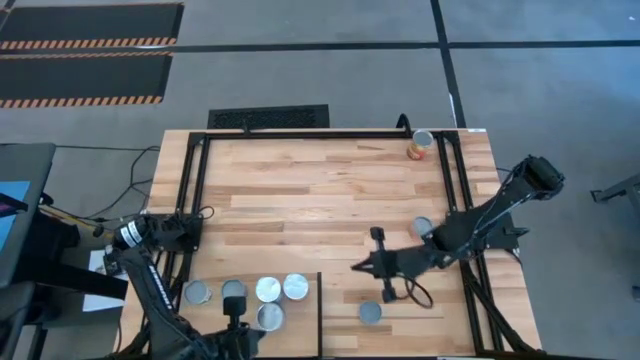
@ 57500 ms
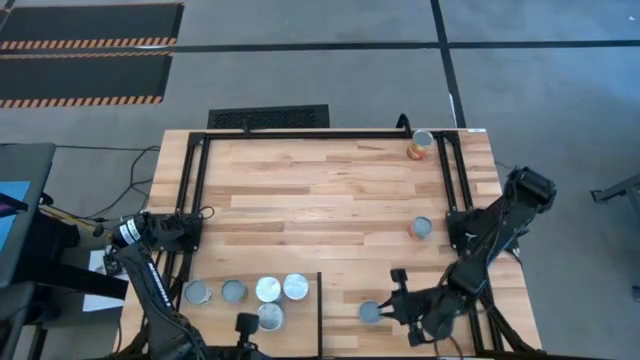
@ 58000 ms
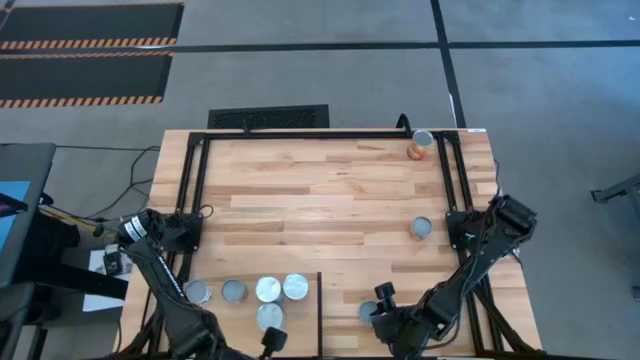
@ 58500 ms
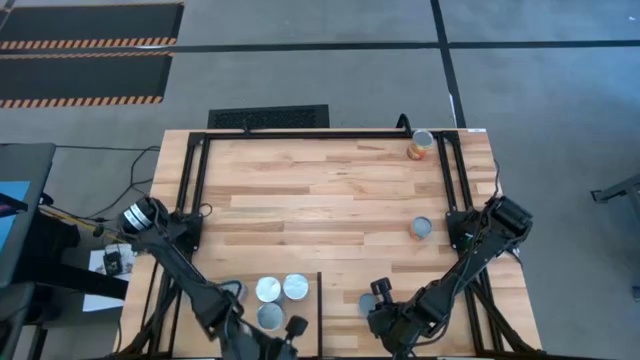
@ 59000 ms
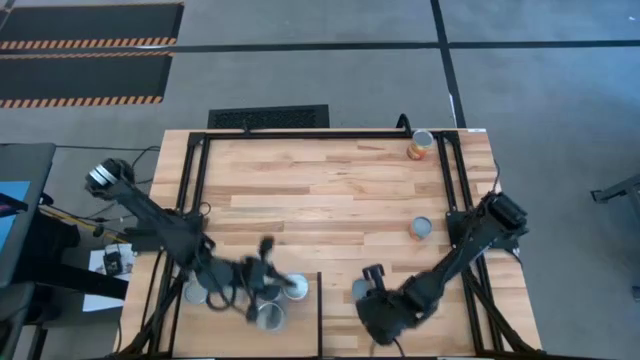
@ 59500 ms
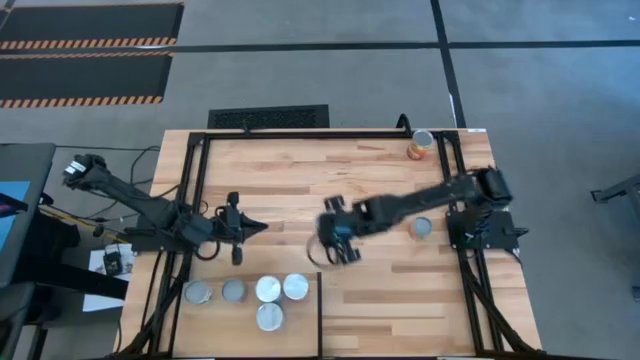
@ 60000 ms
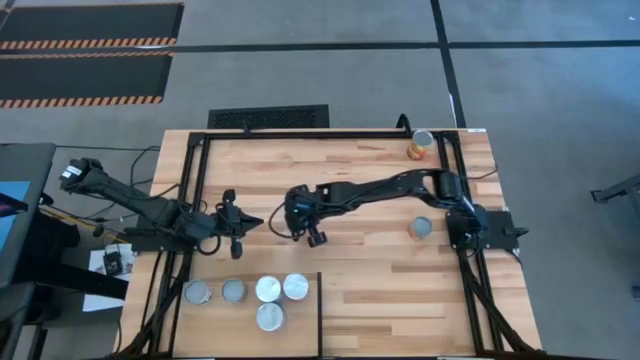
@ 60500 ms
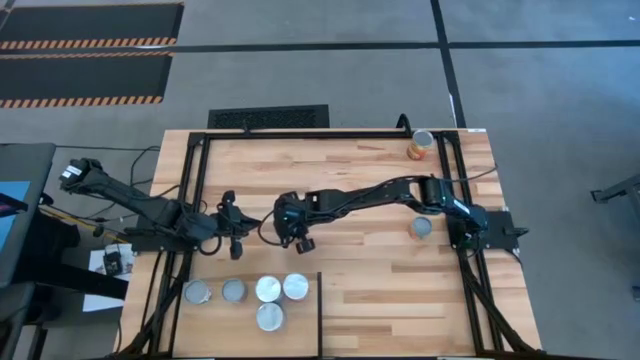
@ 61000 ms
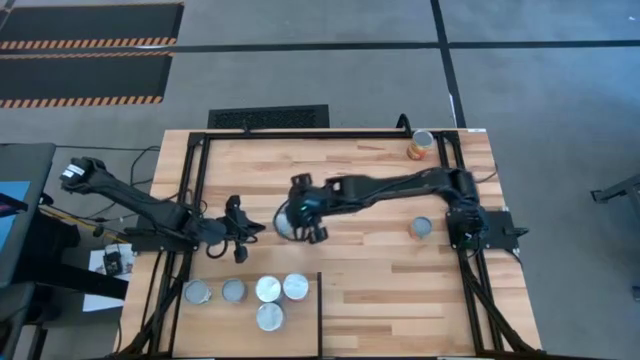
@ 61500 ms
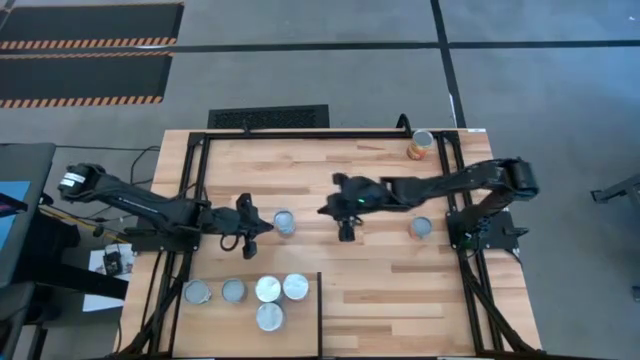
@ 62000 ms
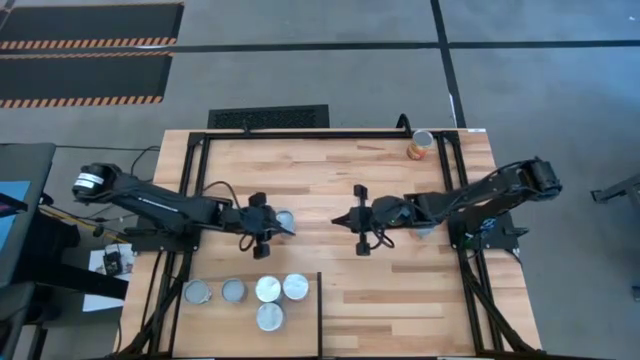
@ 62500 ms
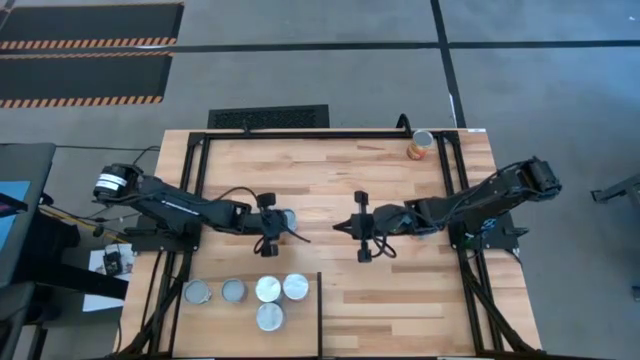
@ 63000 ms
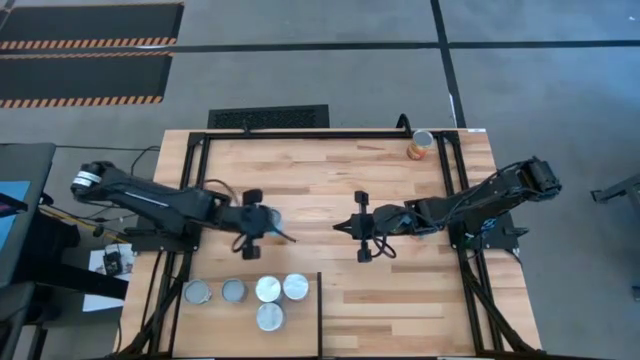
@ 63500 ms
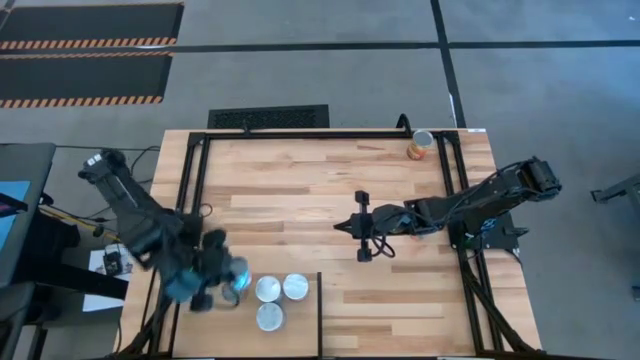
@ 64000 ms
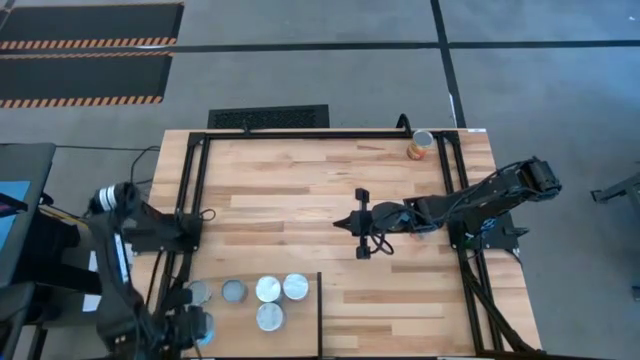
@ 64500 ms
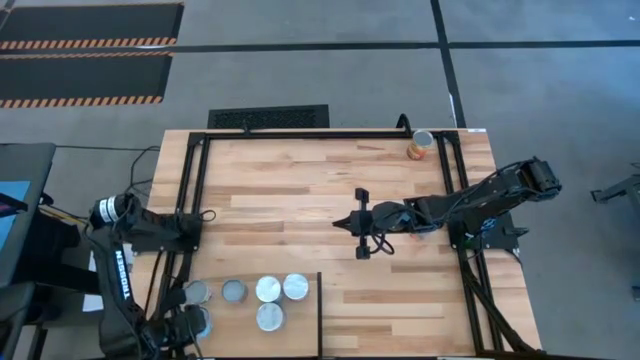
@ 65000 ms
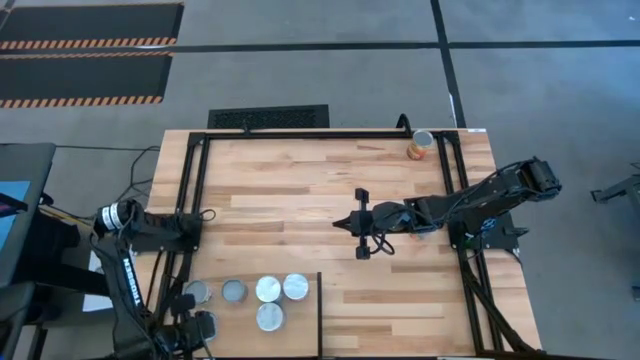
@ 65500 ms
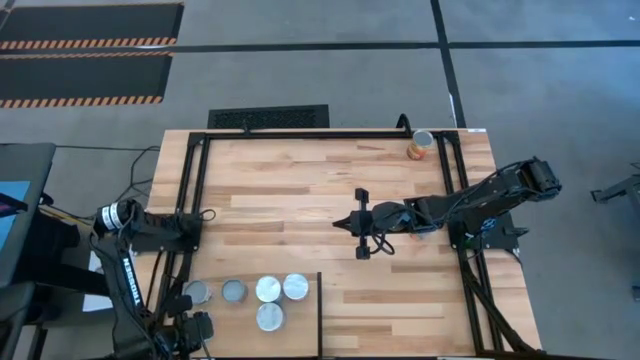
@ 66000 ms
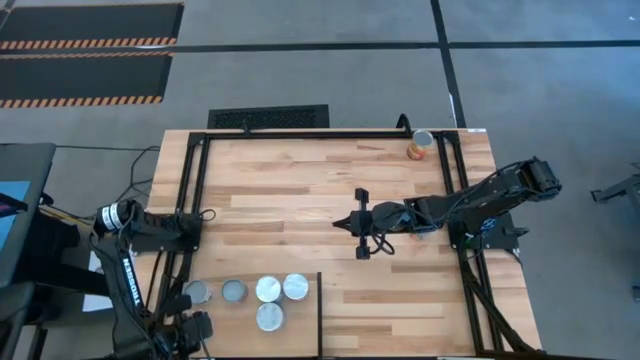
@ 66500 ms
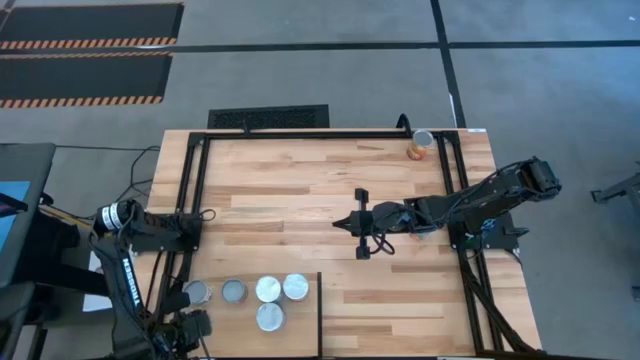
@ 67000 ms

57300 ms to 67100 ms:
Task: Pick and place cans onto a shelf
Put the canned sliced carrot on the shelf

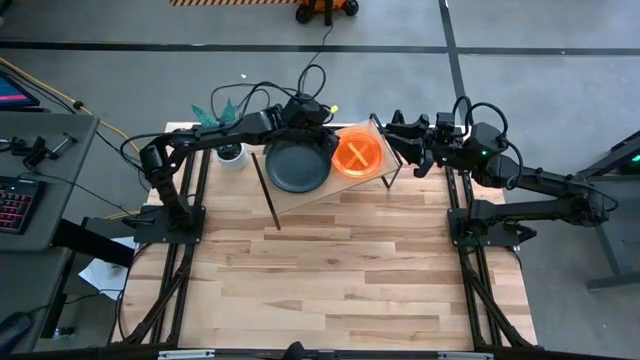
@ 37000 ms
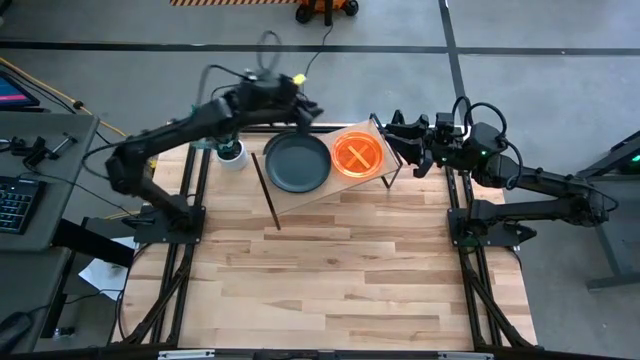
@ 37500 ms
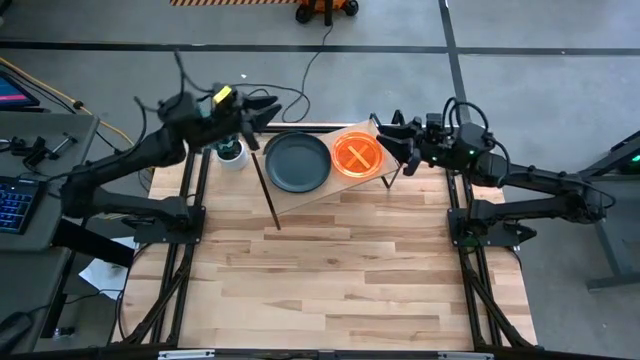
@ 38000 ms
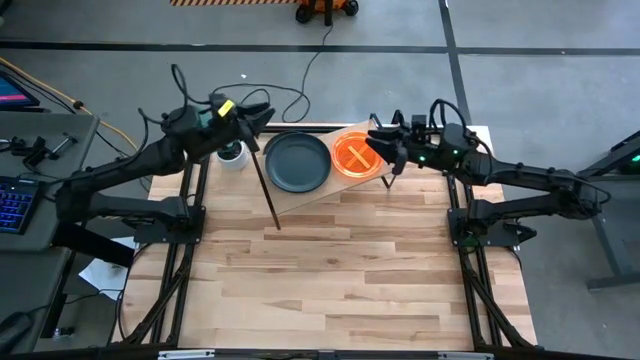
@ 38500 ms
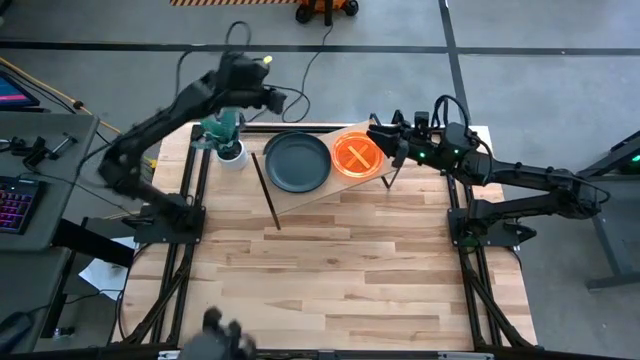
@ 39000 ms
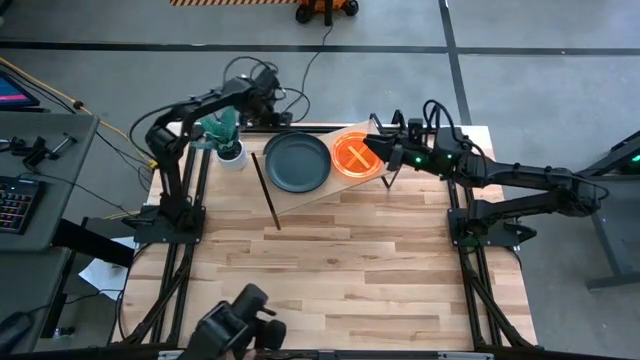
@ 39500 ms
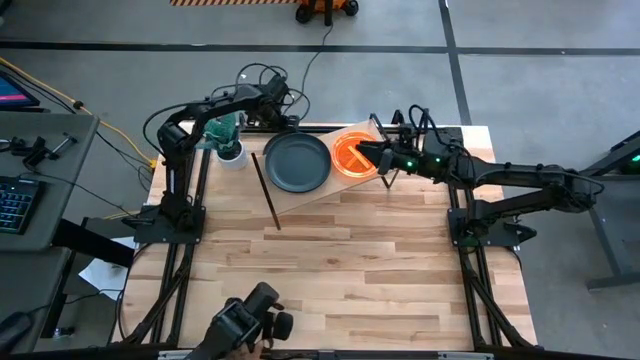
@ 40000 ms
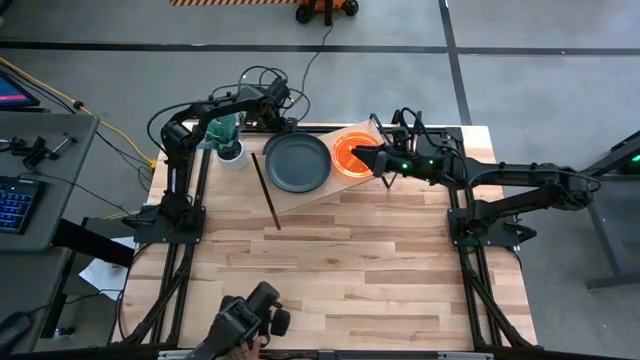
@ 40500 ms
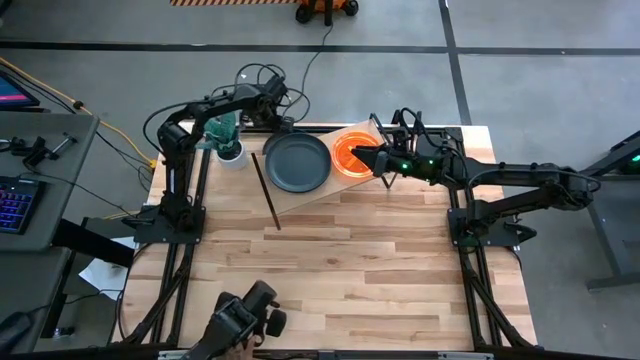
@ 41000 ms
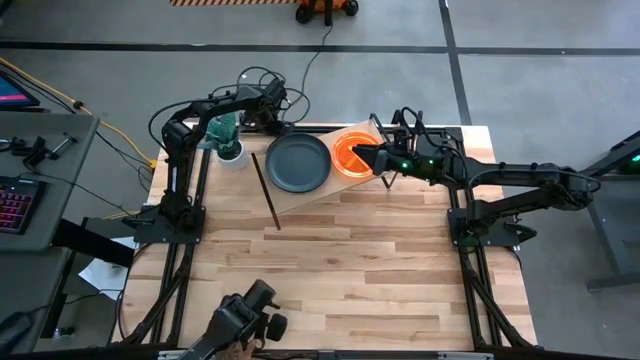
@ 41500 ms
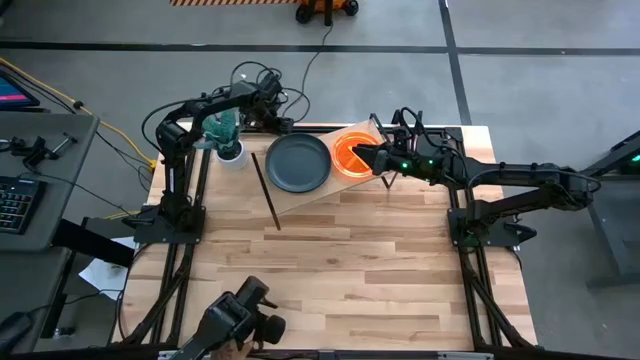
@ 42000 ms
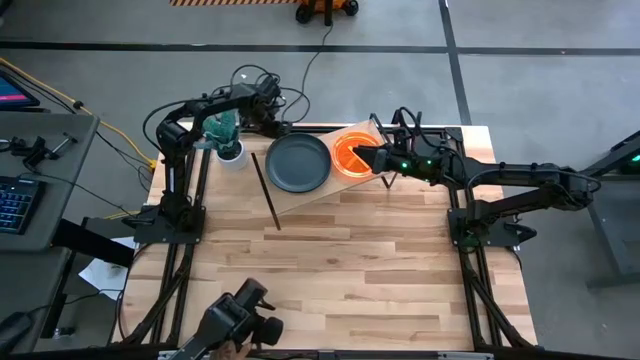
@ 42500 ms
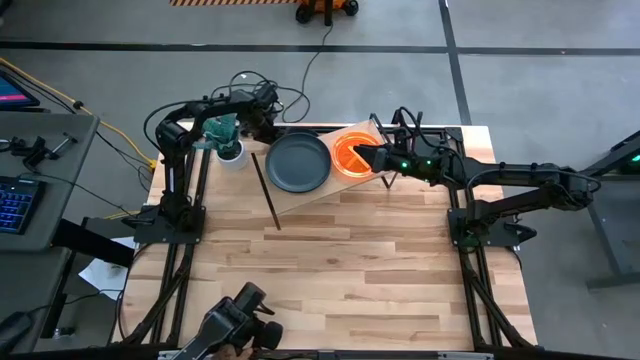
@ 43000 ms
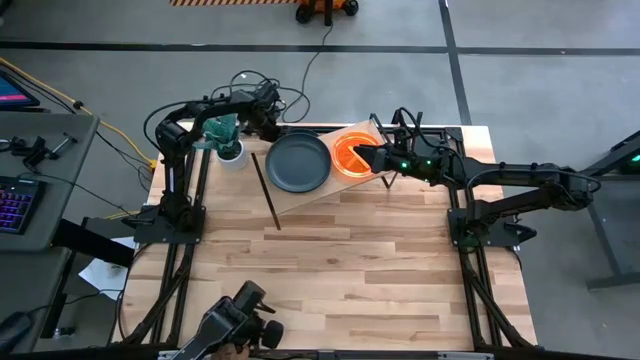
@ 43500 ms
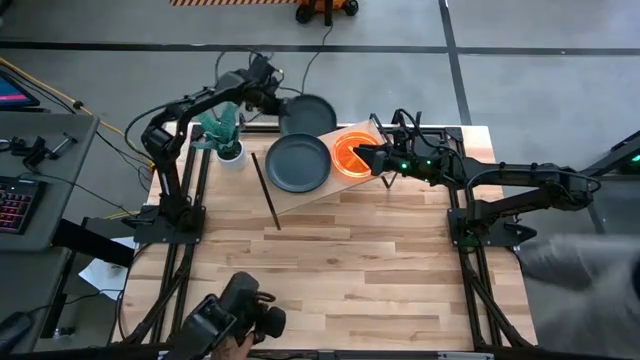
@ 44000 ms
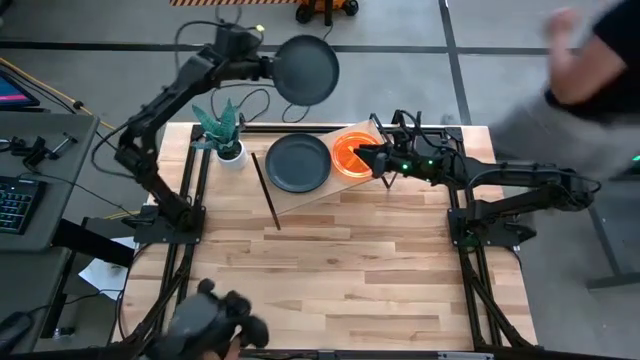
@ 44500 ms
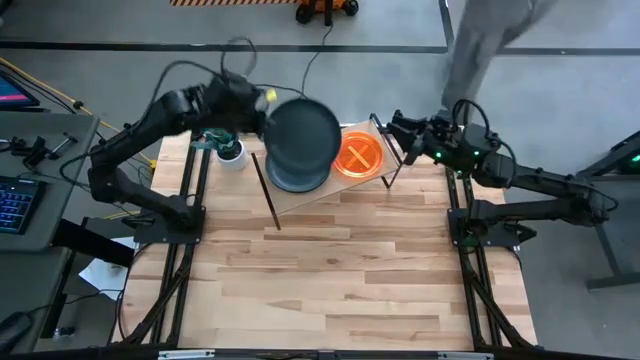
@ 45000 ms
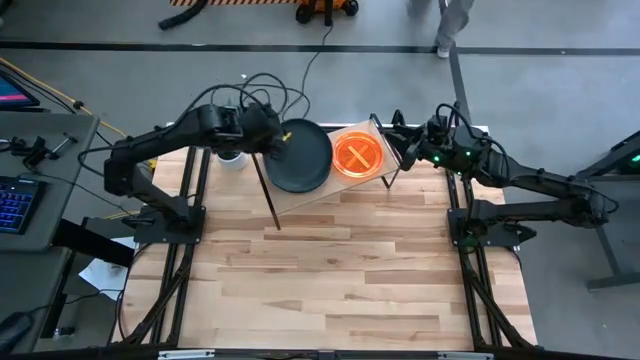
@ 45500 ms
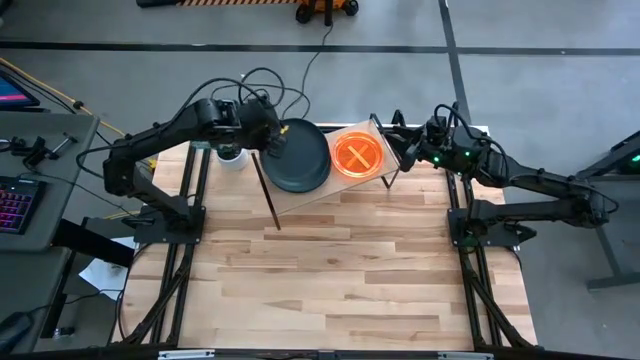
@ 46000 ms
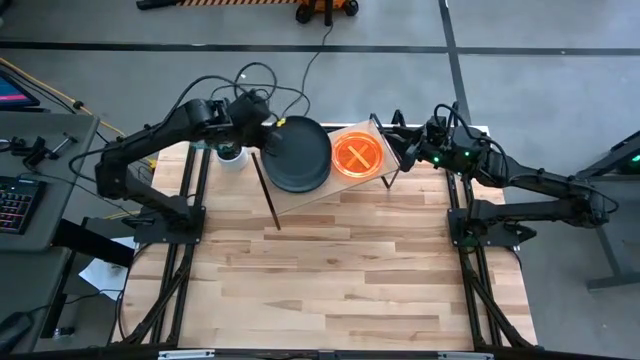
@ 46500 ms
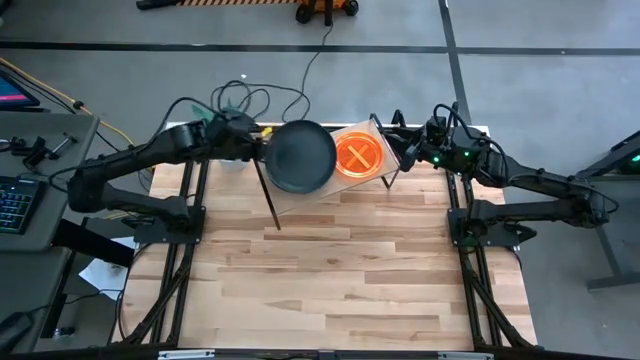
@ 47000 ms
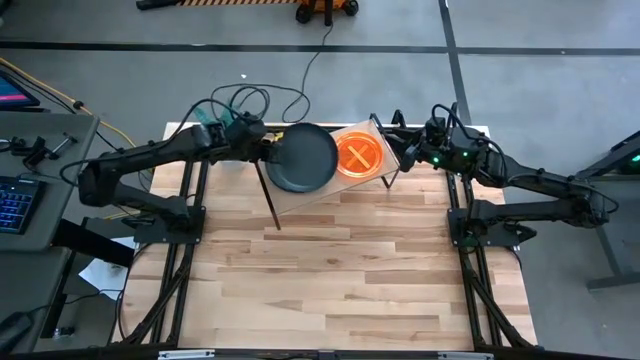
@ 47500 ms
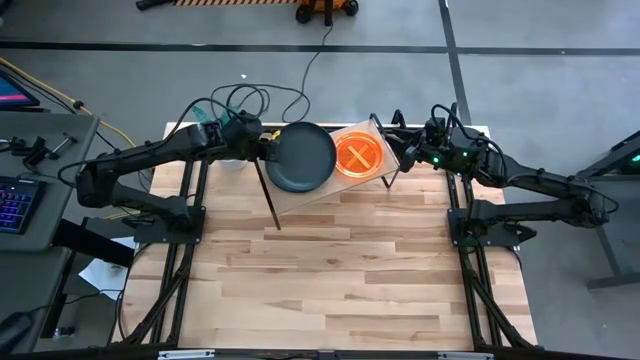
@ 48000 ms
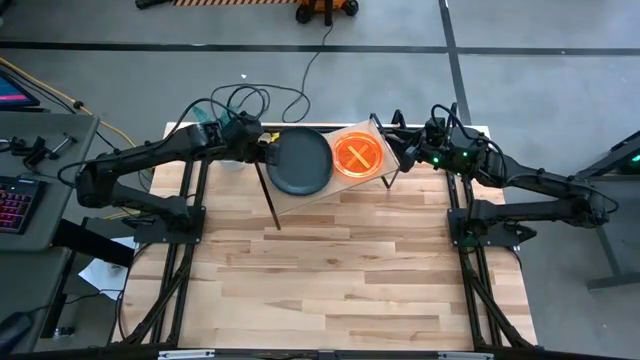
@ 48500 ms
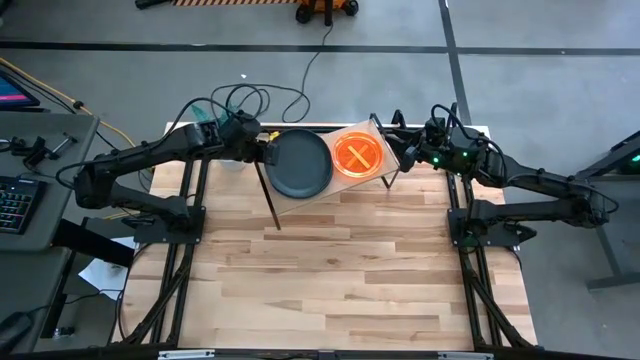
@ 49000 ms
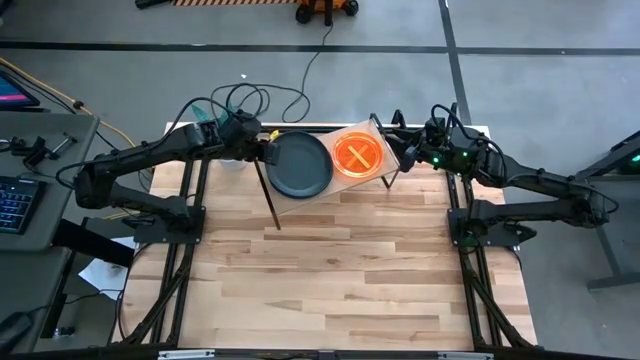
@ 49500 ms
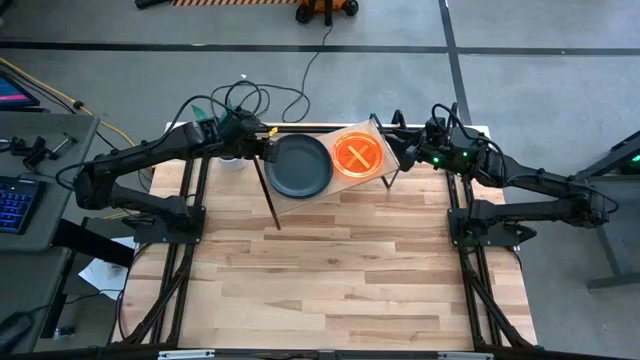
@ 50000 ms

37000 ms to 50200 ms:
Task: Place and stack plates onto a shelf
Stack the black plate on top of the black plate on the shelf
